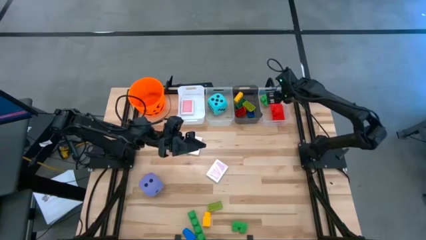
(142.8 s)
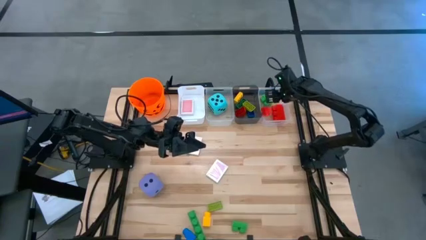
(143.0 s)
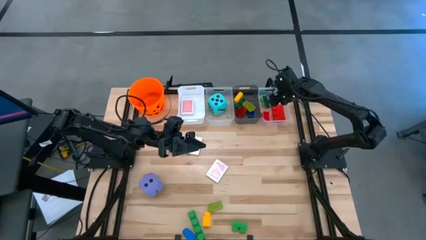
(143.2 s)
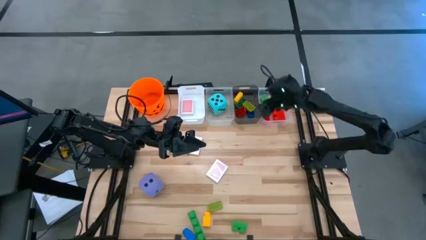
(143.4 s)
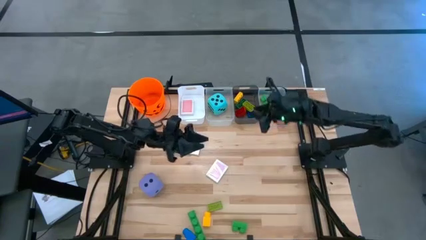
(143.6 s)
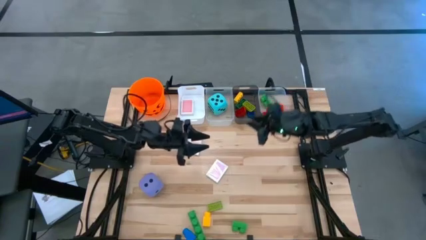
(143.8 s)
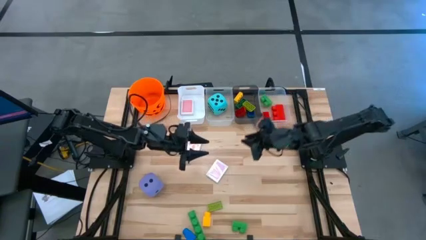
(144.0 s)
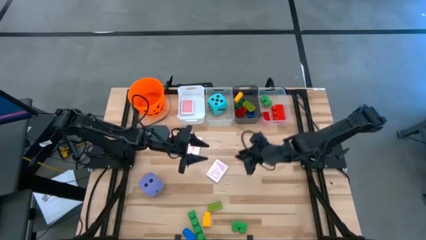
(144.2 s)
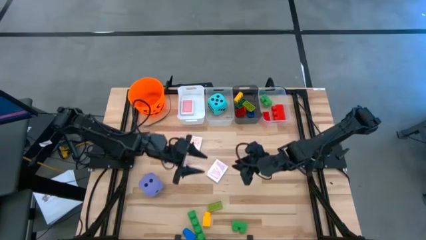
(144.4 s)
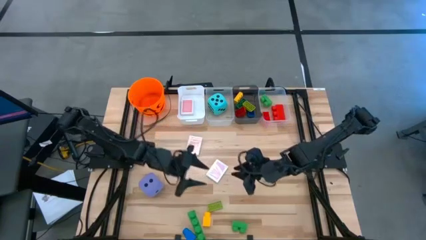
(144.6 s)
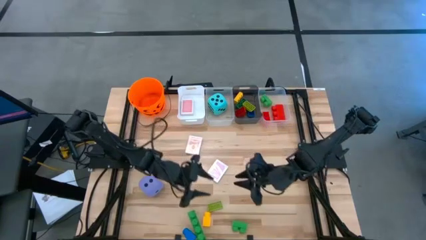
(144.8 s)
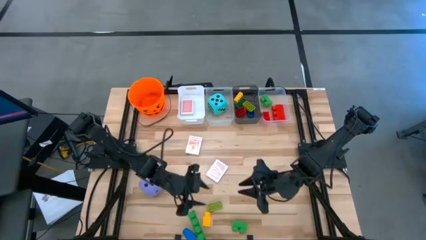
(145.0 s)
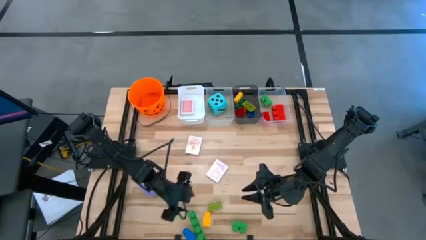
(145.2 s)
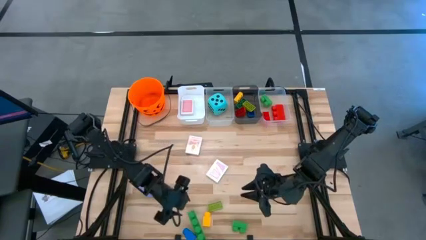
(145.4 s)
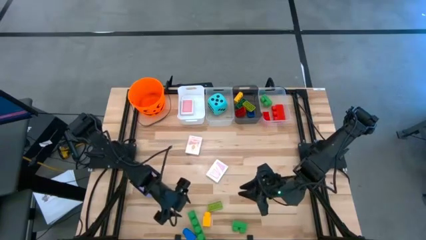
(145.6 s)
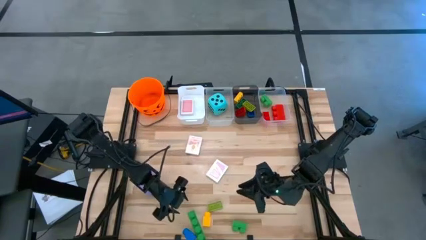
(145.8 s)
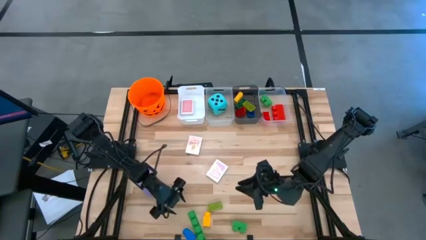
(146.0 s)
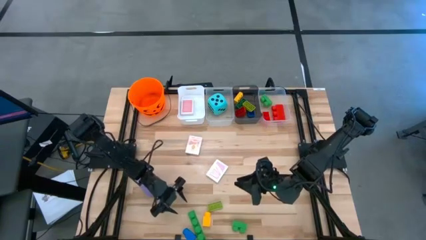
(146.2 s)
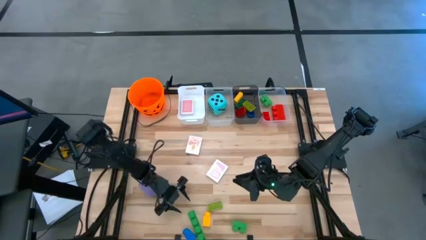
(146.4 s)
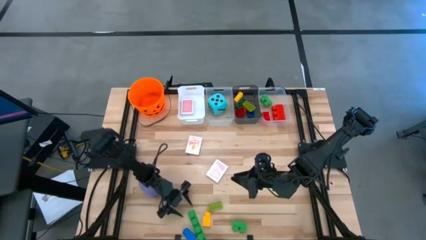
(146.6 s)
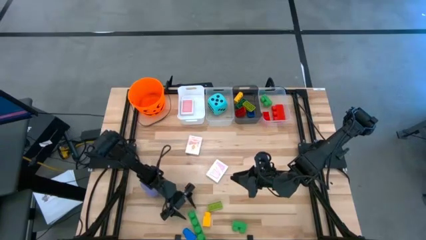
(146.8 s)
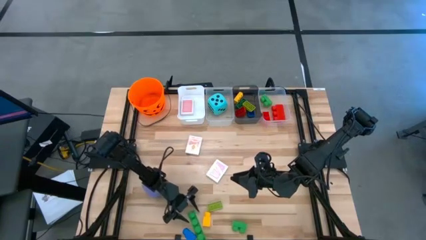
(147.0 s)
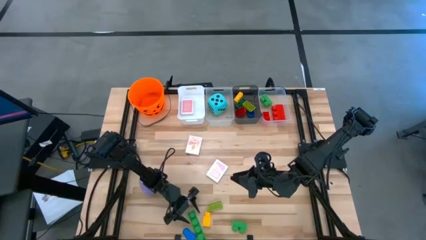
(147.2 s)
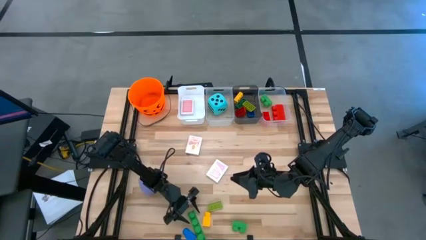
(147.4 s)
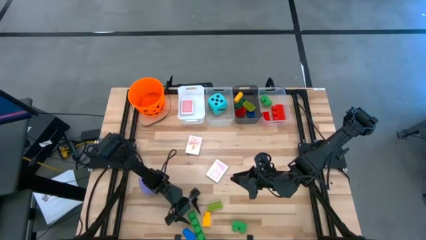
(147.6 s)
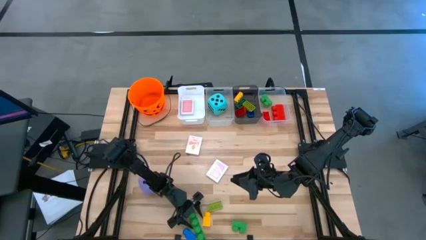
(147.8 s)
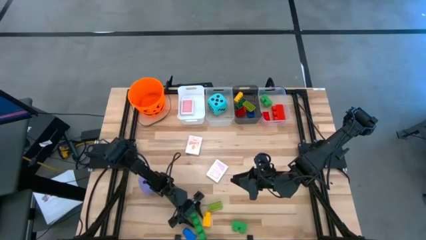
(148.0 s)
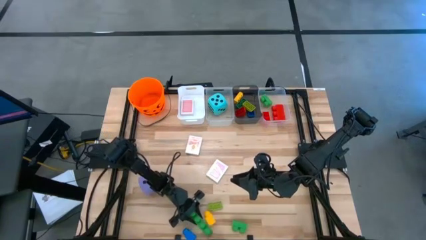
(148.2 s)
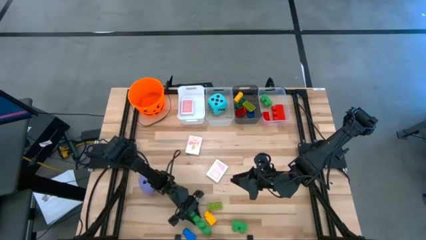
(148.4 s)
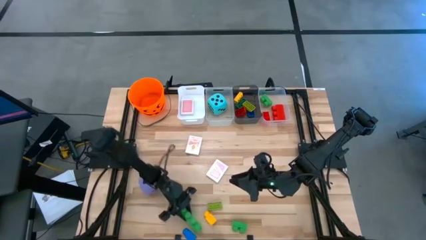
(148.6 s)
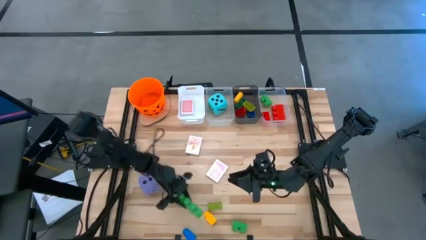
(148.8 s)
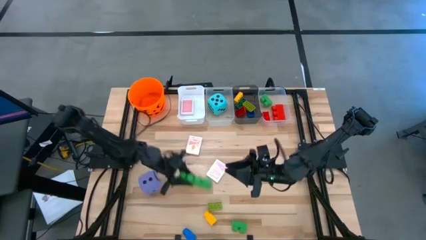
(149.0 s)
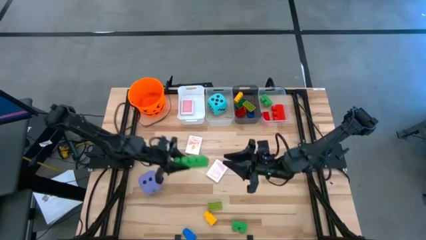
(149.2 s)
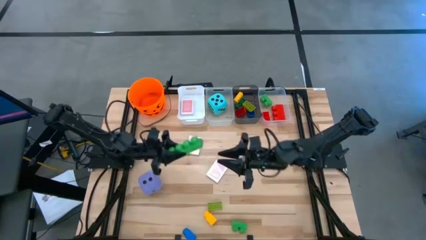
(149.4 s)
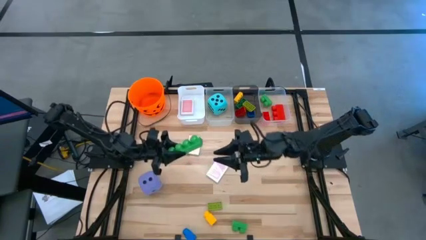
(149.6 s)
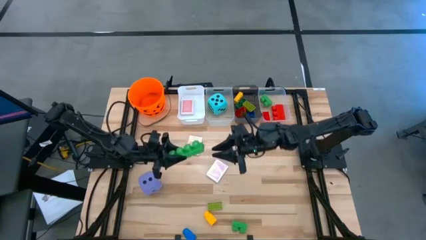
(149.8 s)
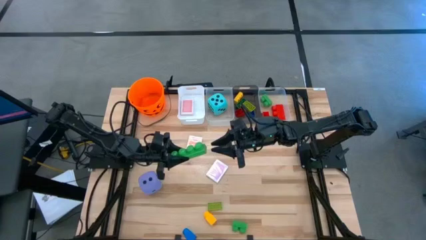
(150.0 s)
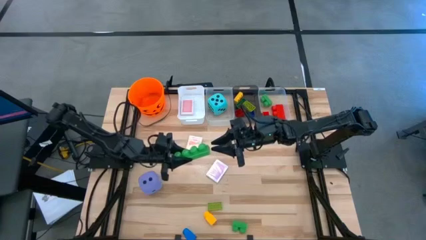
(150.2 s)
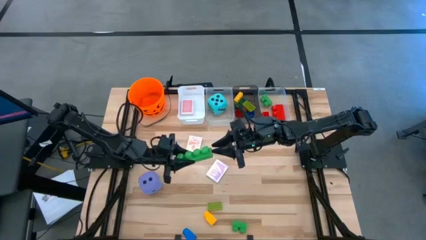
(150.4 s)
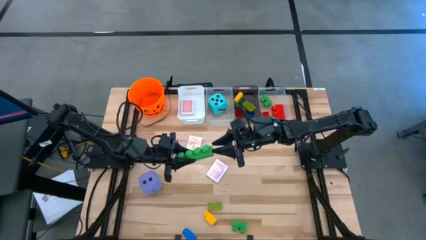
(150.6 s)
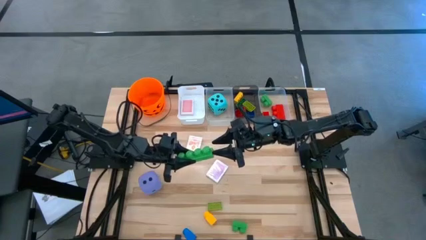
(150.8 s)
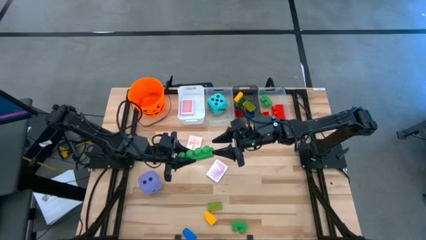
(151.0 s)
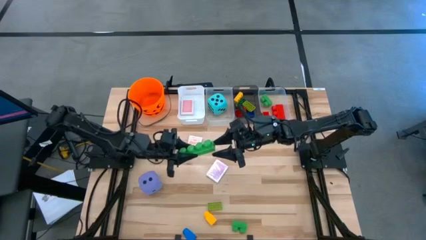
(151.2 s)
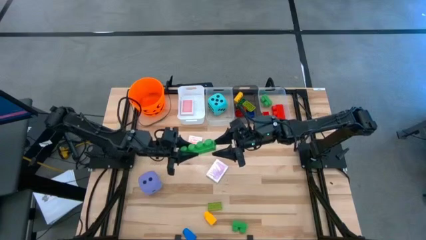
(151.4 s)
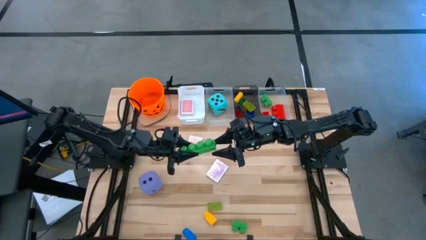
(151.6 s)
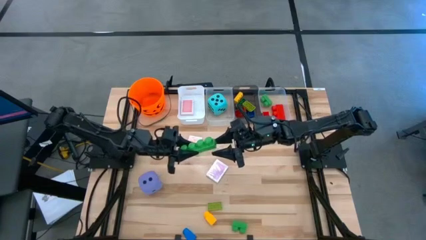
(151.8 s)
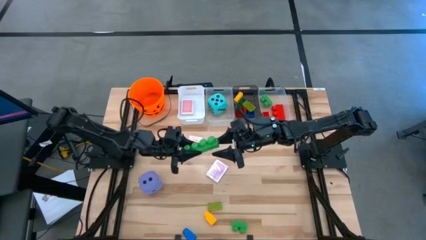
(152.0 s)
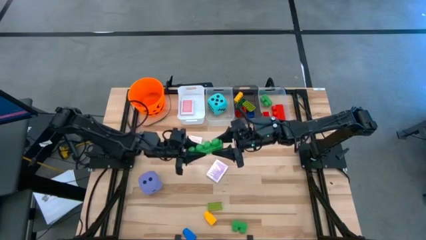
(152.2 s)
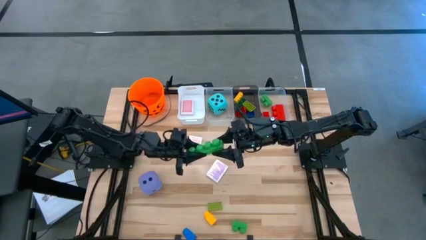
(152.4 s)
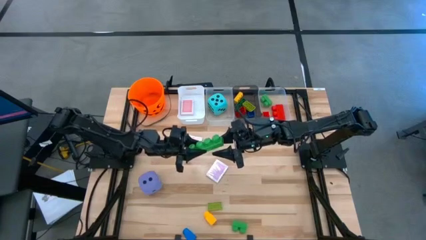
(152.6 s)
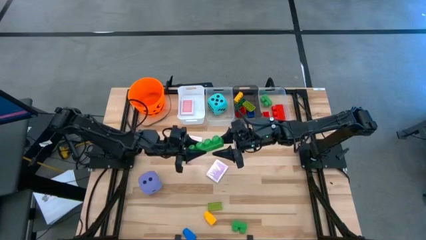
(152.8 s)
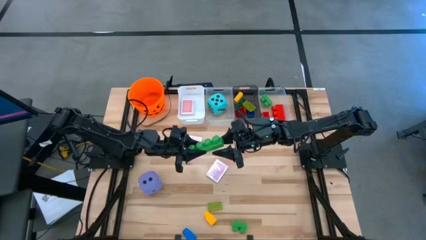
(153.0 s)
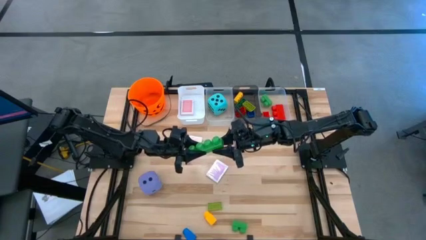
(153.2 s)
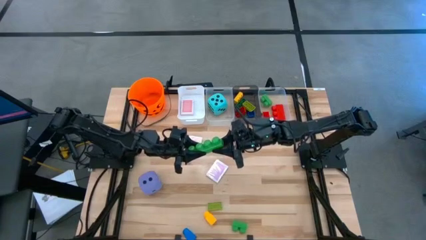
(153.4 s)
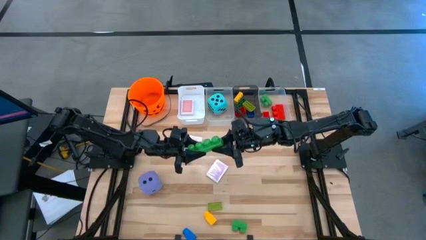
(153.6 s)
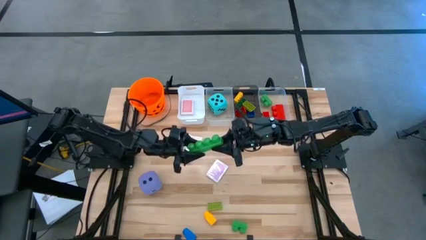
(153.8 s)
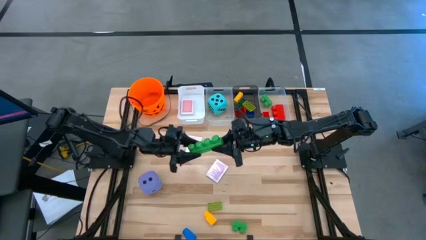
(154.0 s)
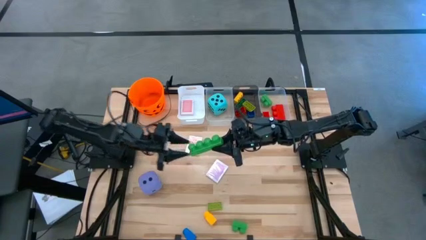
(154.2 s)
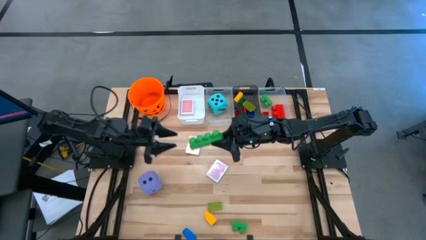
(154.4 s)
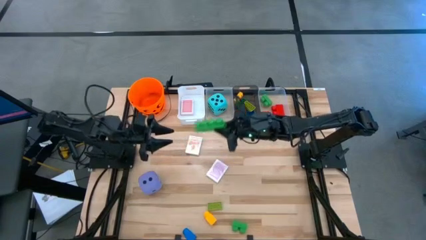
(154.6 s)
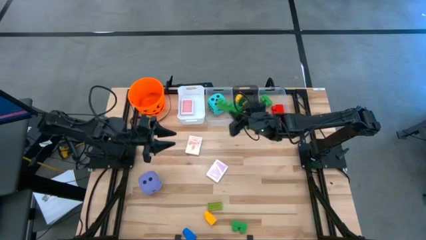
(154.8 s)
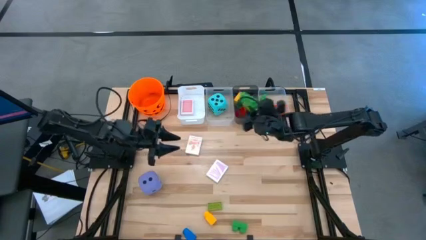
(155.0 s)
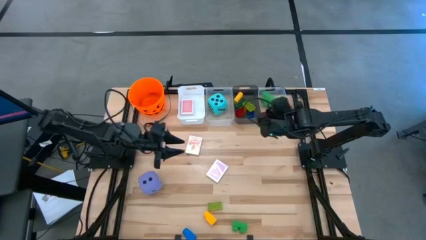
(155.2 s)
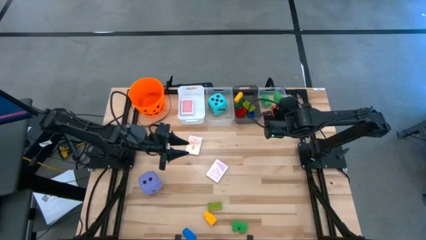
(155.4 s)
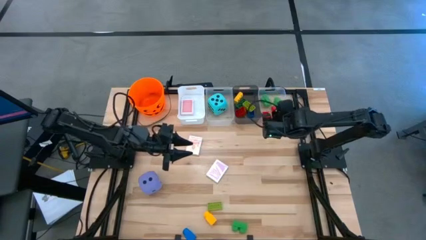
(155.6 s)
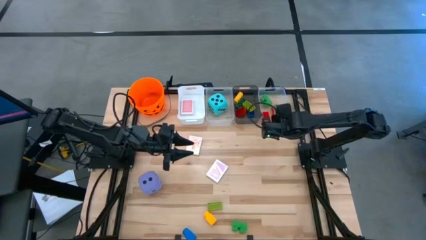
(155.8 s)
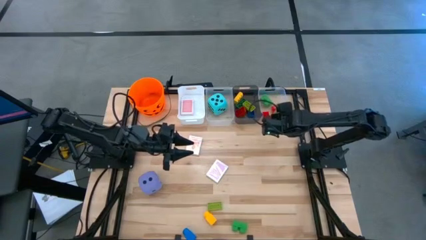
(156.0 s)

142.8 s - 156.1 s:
Task: Pick & Place Toys
Put the large green game piece into the right transparent bin

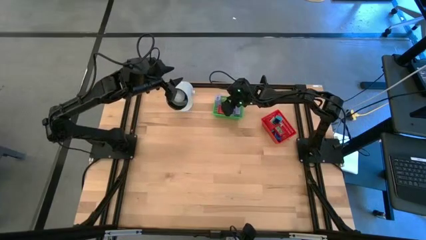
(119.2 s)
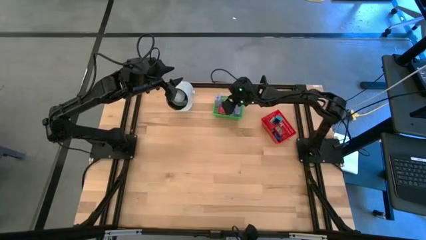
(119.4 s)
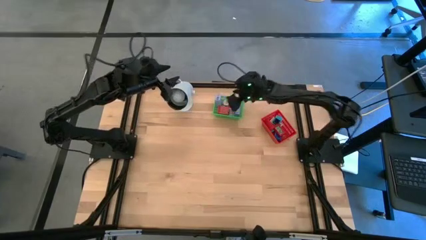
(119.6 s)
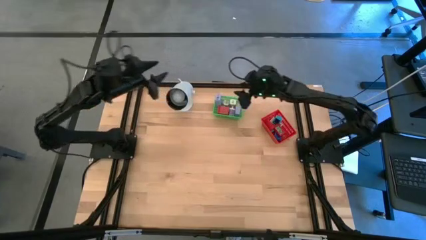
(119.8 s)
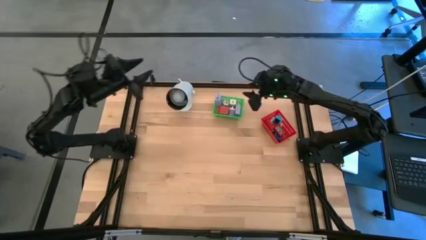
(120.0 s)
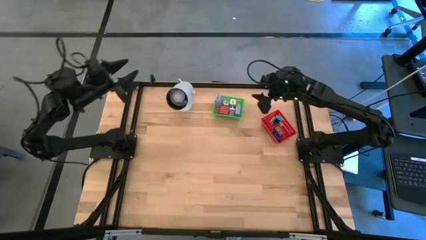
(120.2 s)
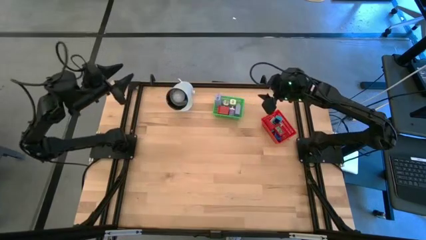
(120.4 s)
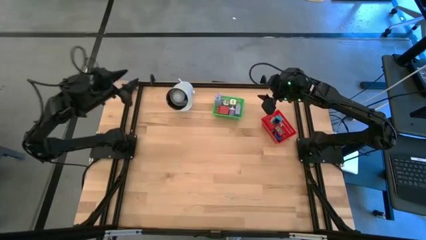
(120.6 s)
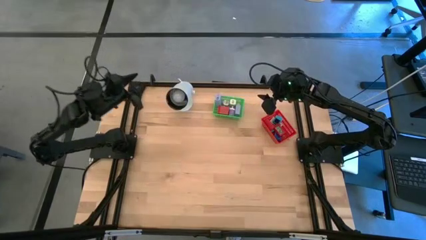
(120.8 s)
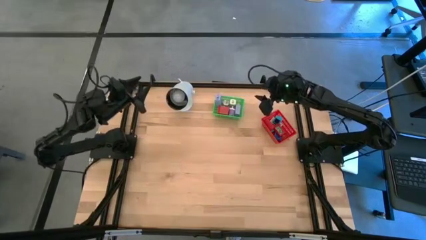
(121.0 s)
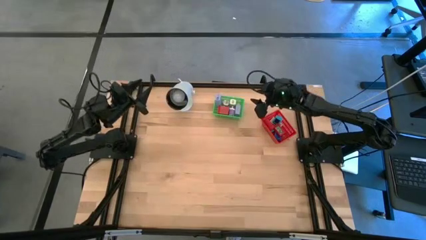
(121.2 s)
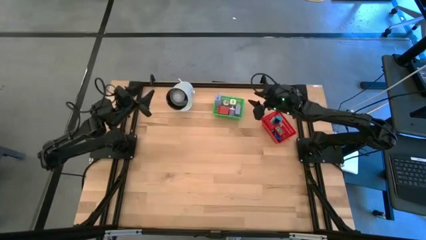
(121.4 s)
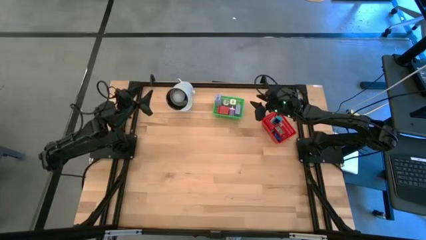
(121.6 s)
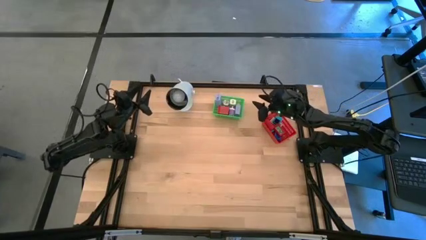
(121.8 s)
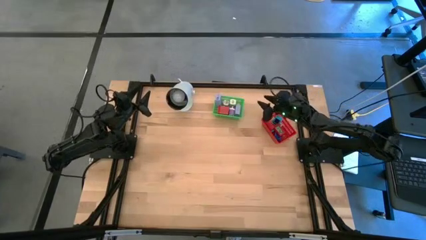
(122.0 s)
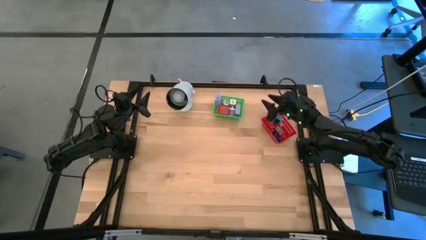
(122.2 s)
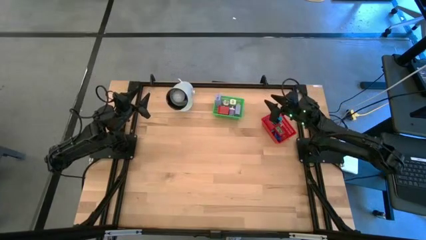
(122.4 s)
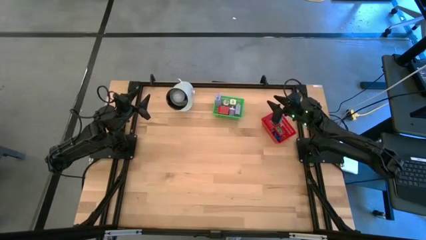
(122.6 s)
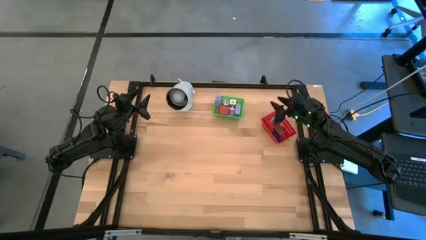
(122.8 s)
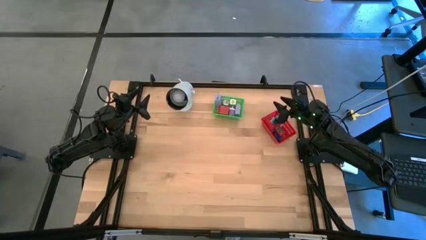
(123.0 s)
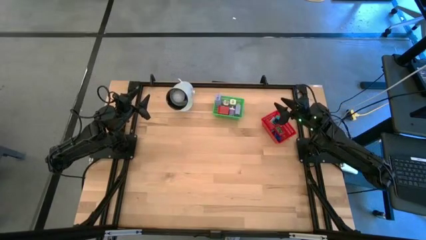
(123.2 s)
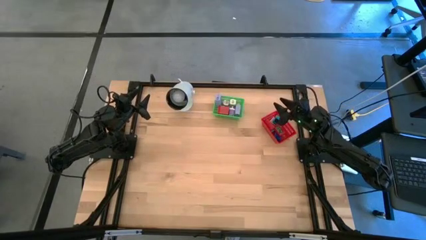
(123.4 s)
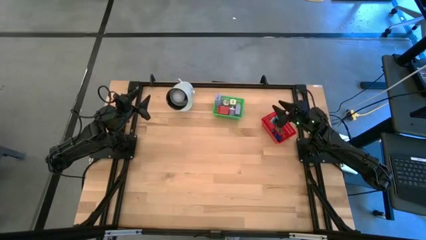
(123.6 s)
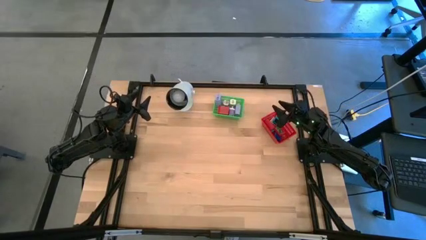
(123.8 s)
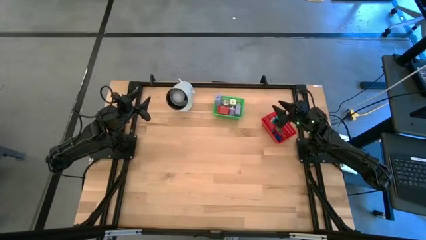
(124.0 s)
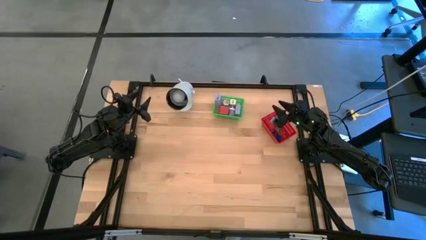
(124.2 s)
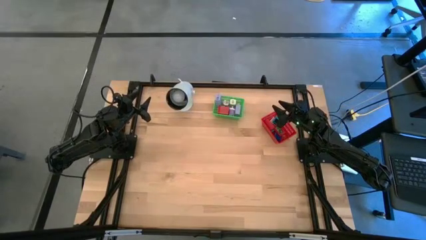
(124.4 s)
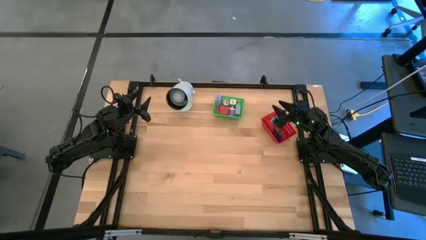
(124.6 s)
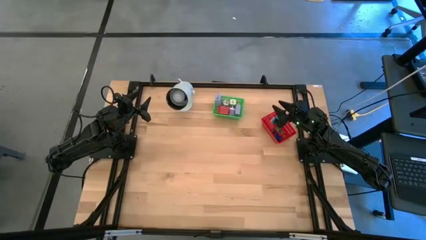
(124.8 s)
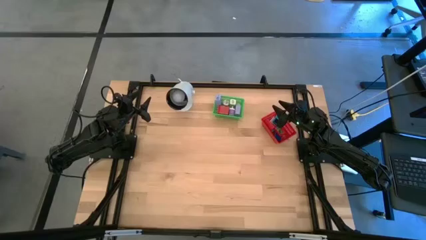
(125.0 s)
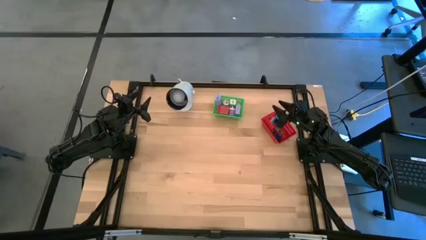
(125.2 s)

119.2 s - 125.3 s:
Task: Pick & Place Office items
Return to Home Position
